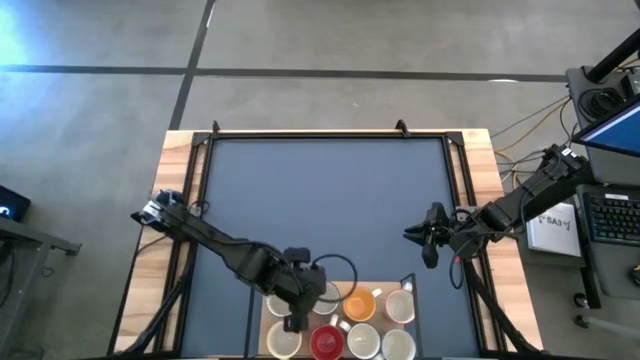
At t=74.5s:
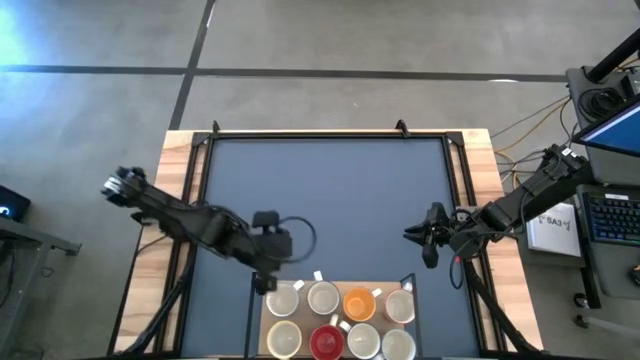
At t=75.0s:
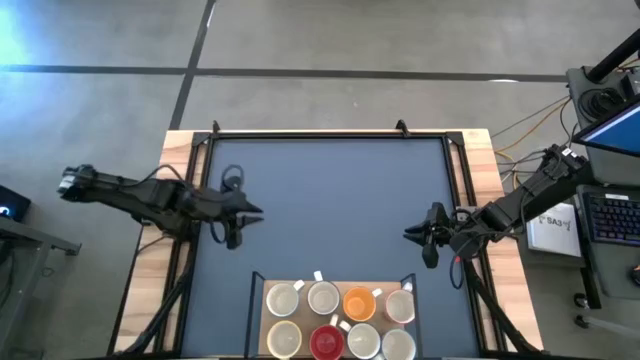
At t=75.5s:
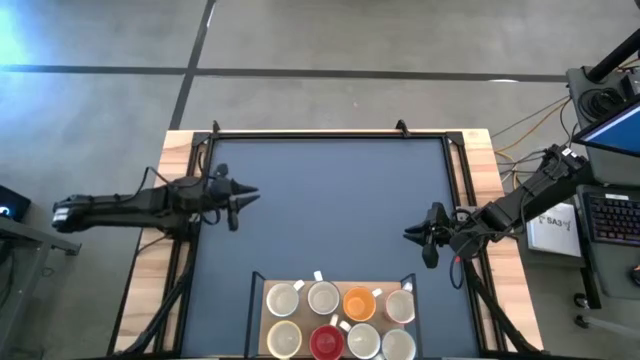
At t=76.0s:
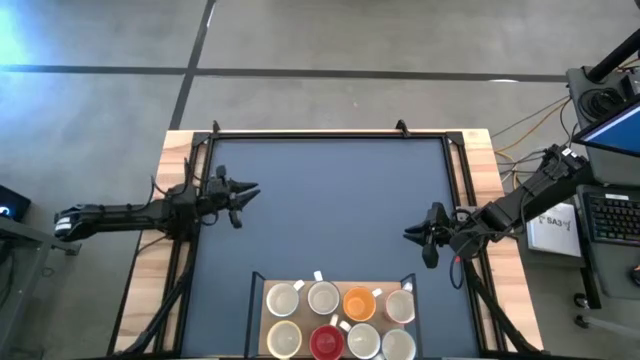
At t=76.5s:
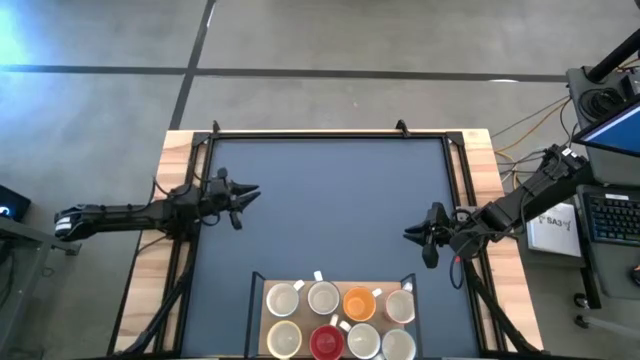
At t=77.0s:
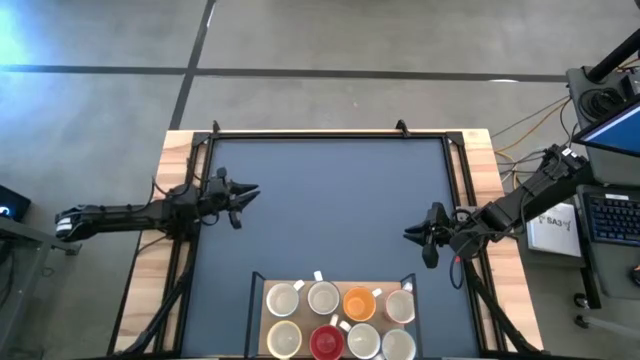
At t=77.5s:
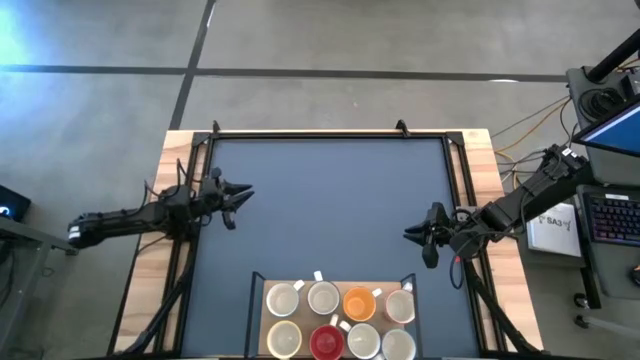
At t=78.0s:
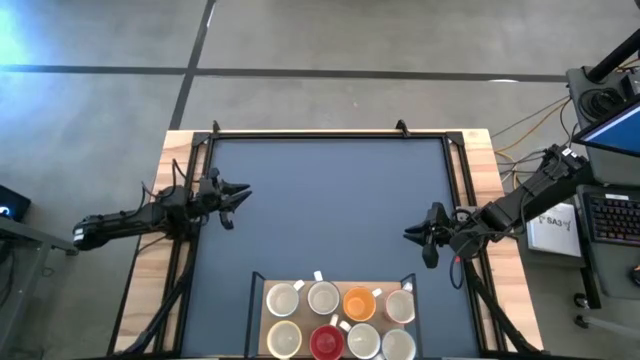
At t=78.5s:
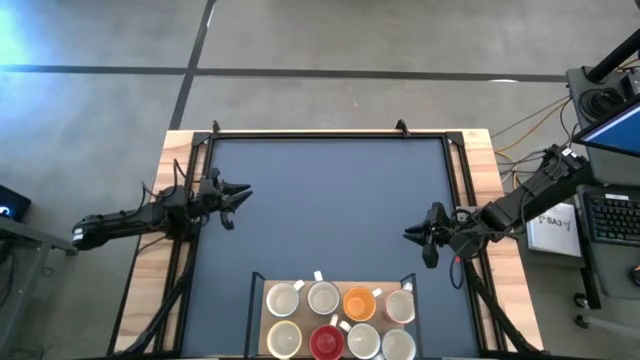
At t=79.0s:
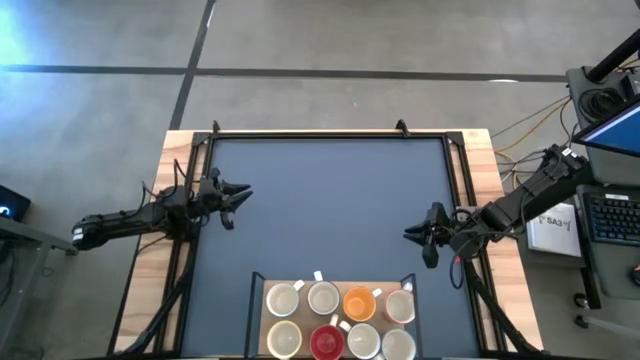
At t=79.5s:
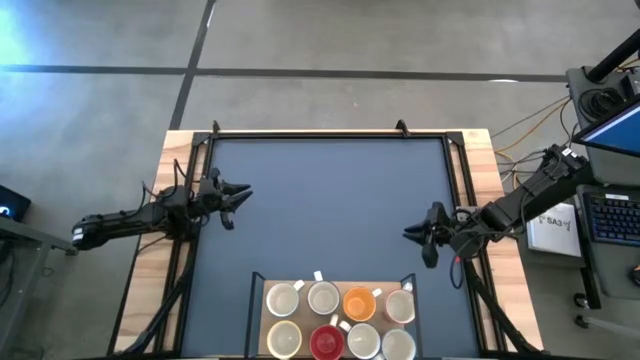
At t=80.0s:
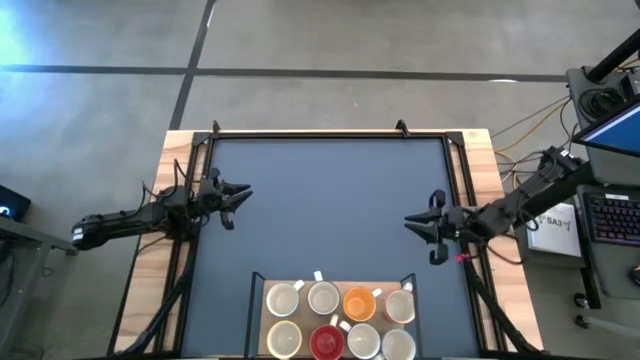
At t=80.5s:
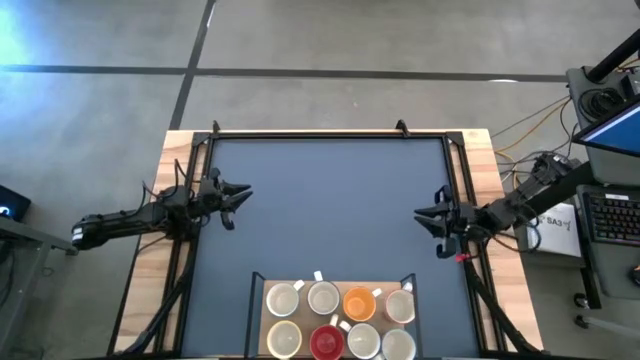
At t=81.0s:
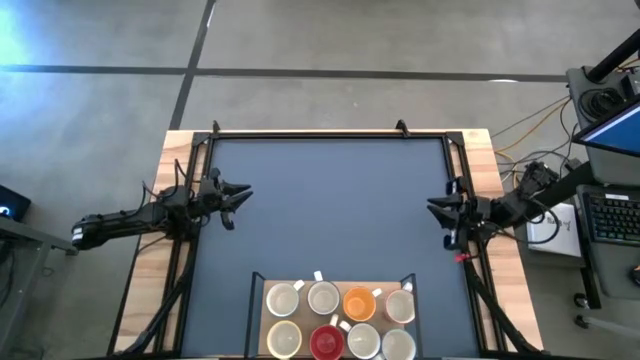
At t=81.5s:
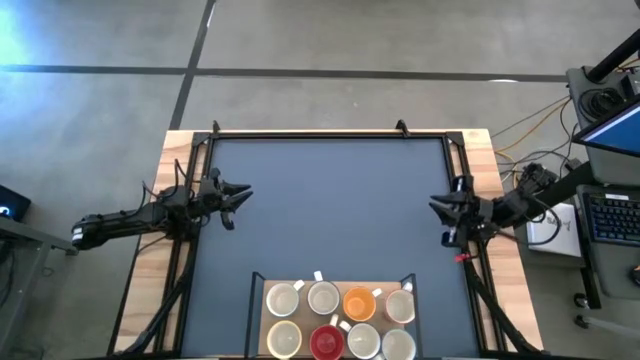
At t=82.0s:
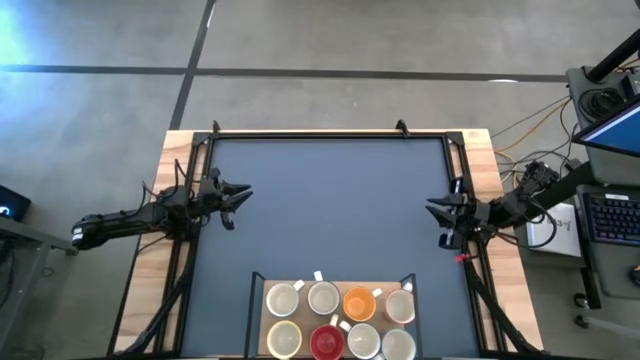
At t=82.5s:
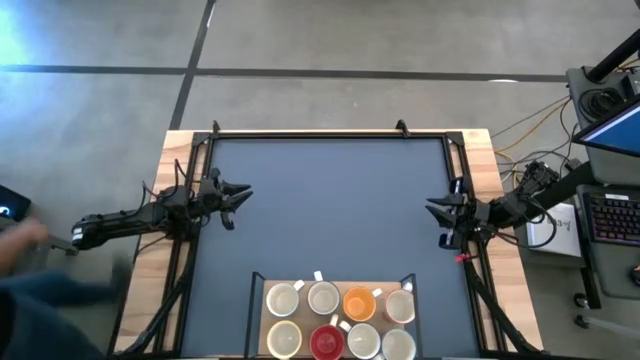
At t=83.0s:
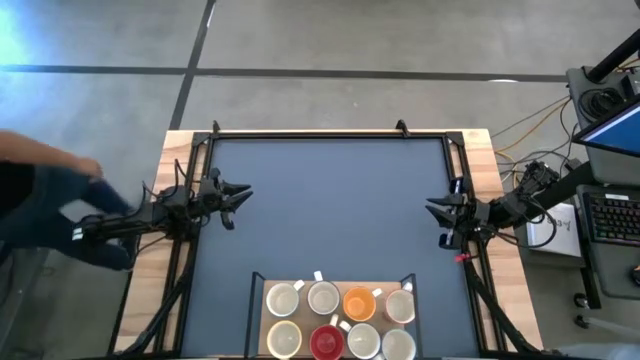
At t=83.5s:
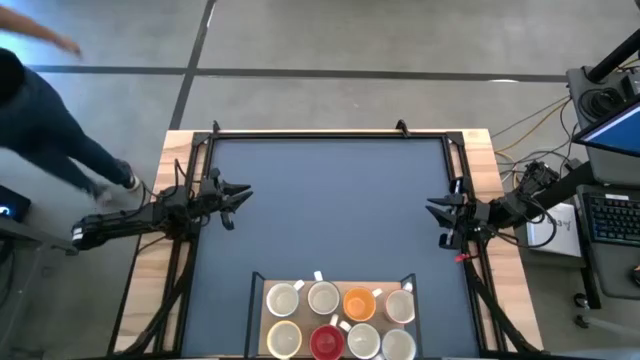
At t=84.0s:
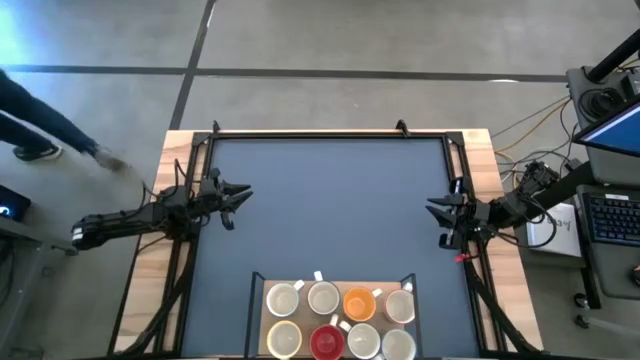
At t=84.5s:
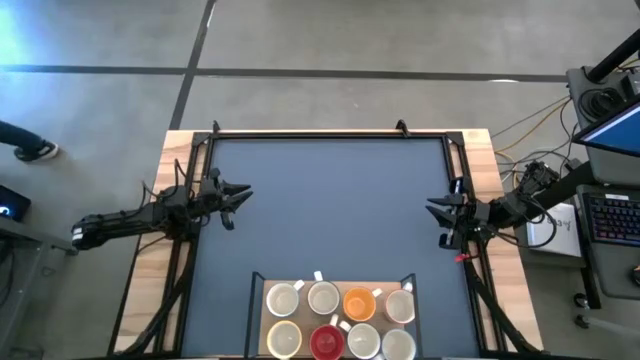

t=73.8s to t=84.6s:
Task: Place coffee mugs
Return to Home Position

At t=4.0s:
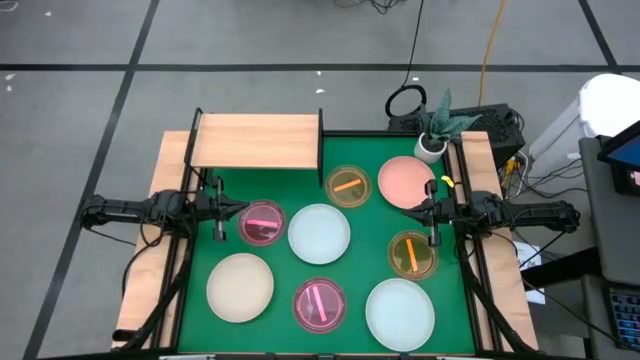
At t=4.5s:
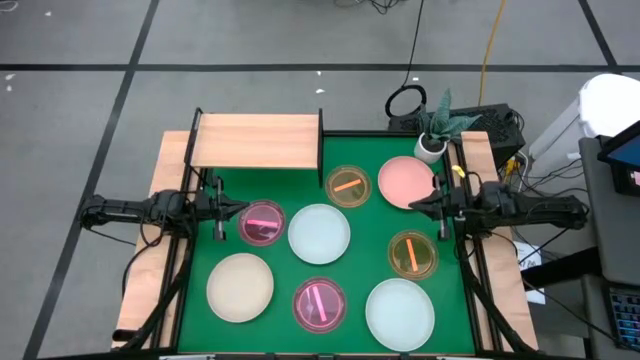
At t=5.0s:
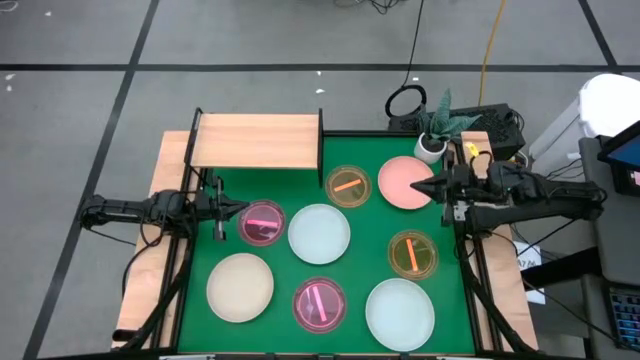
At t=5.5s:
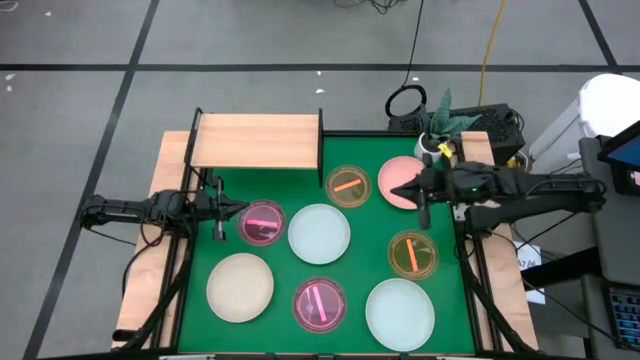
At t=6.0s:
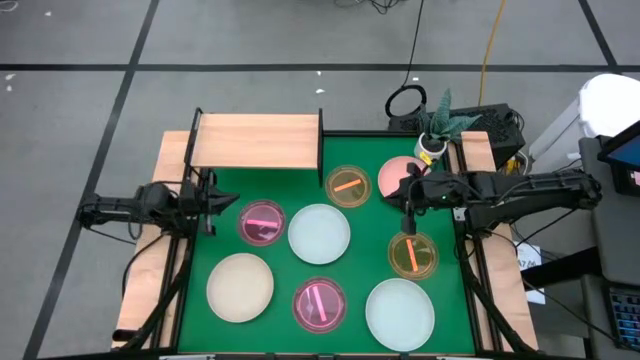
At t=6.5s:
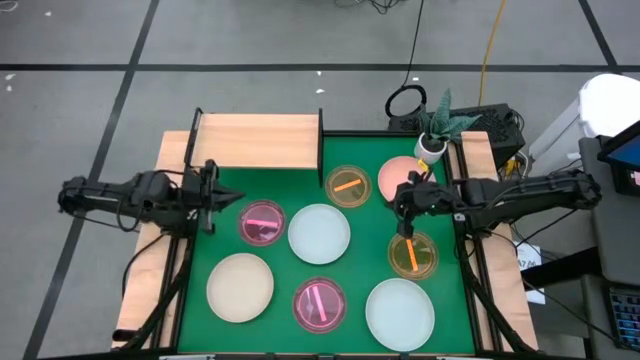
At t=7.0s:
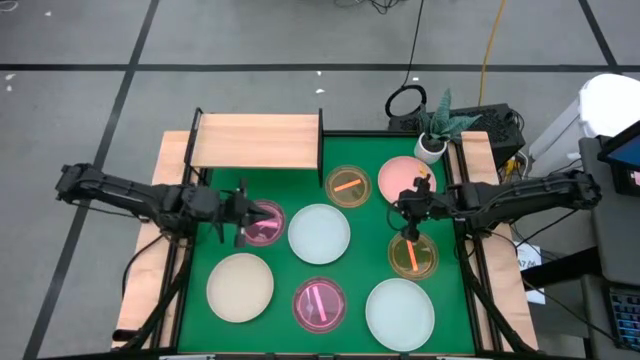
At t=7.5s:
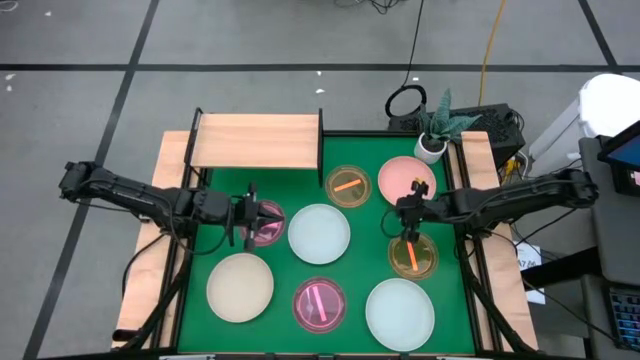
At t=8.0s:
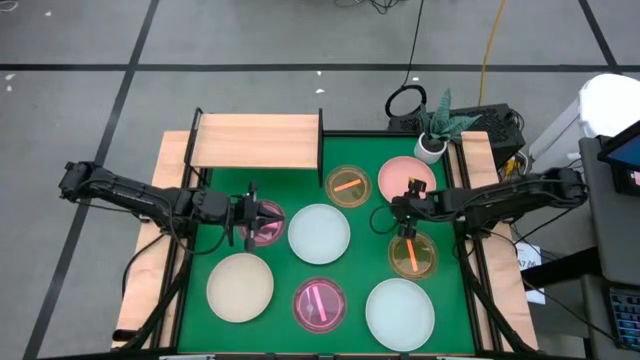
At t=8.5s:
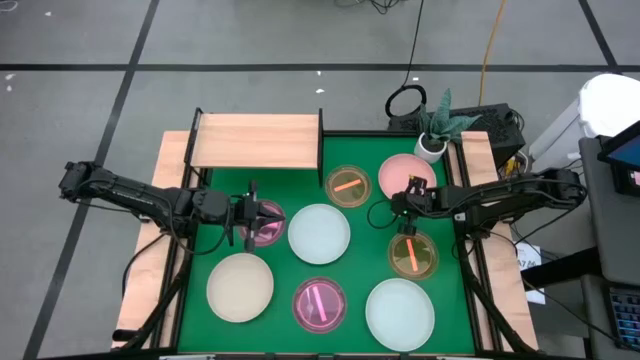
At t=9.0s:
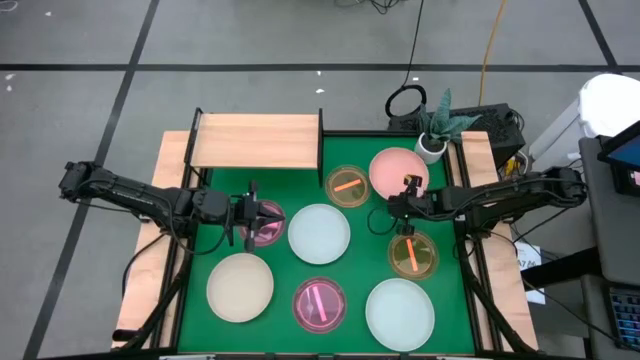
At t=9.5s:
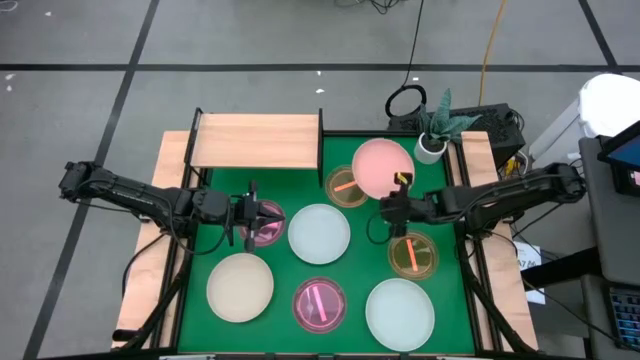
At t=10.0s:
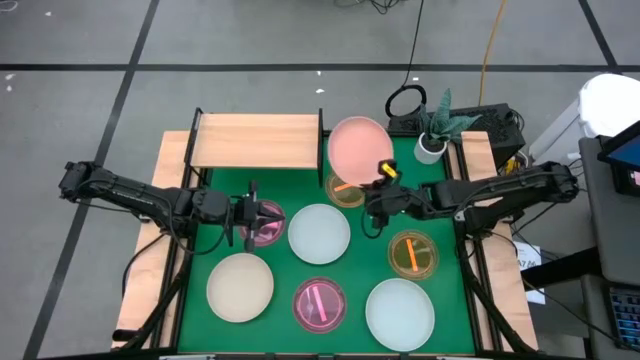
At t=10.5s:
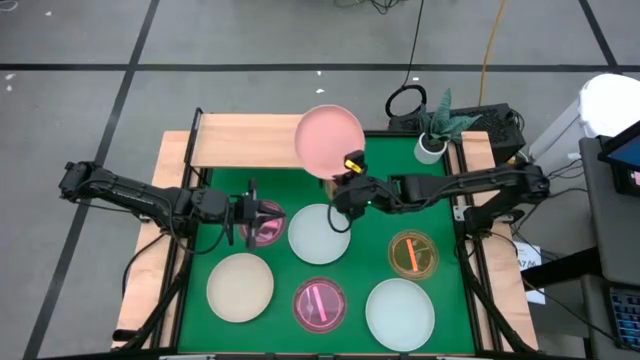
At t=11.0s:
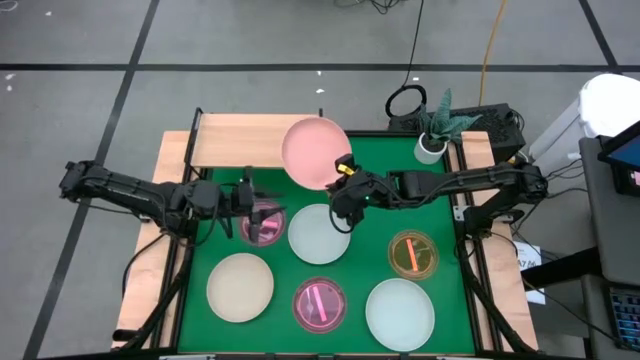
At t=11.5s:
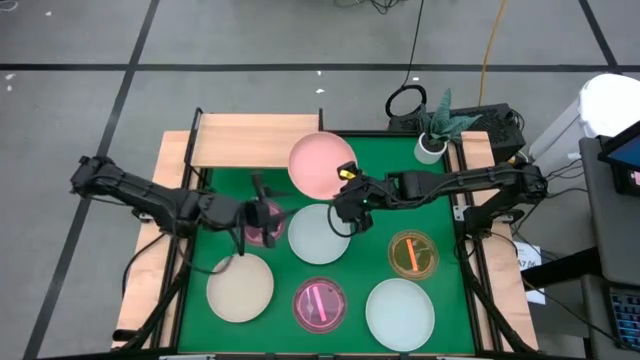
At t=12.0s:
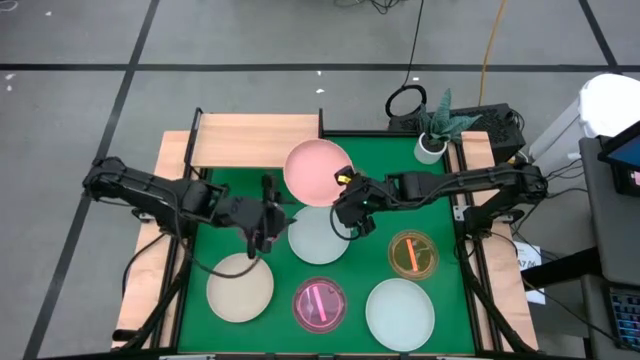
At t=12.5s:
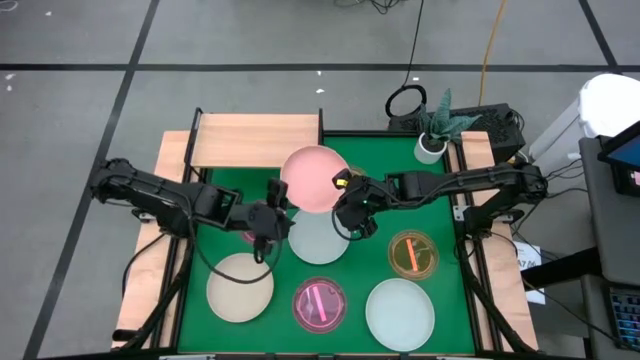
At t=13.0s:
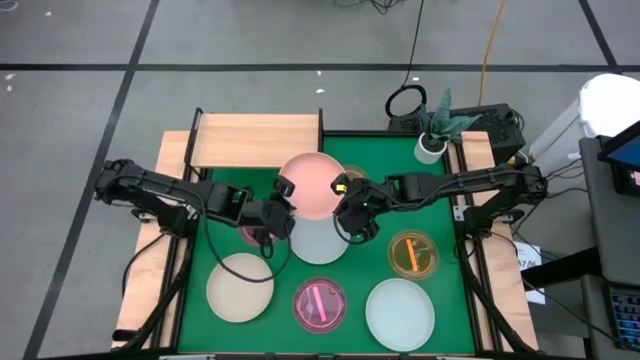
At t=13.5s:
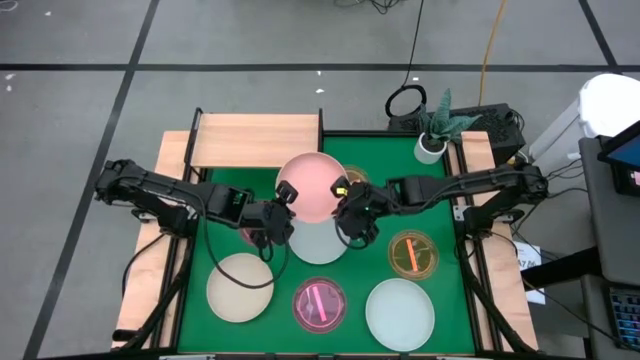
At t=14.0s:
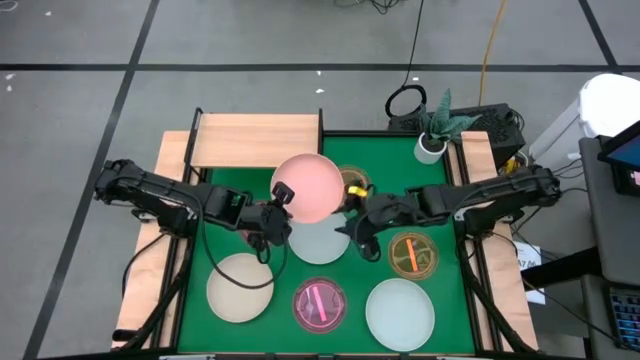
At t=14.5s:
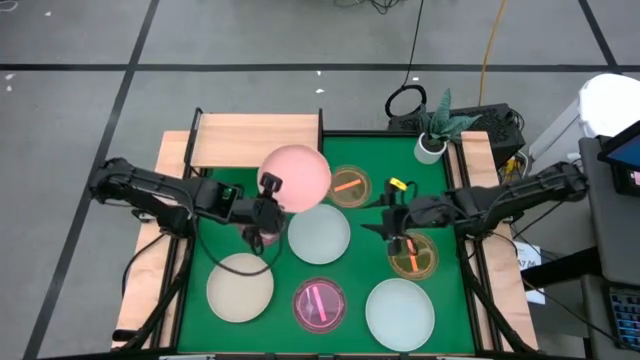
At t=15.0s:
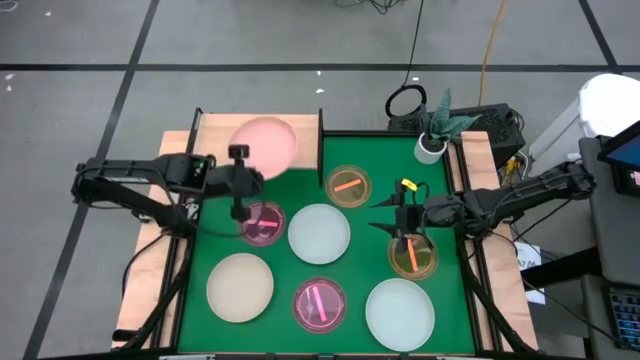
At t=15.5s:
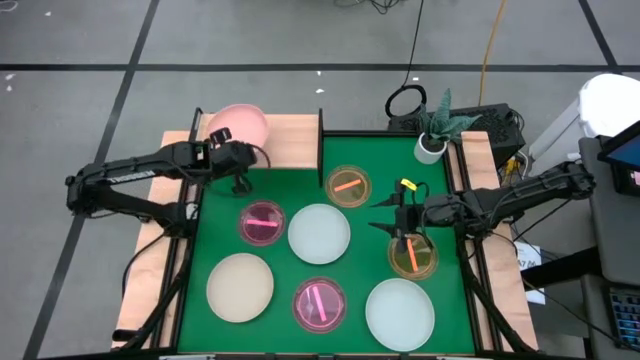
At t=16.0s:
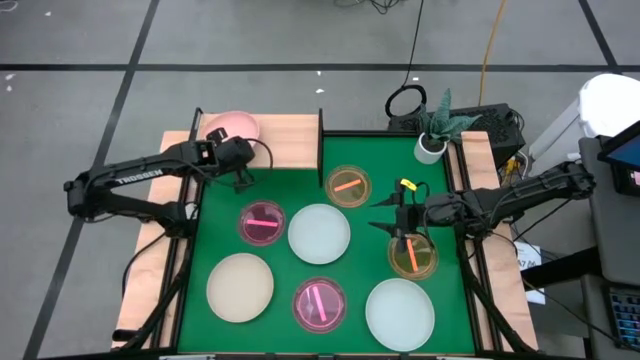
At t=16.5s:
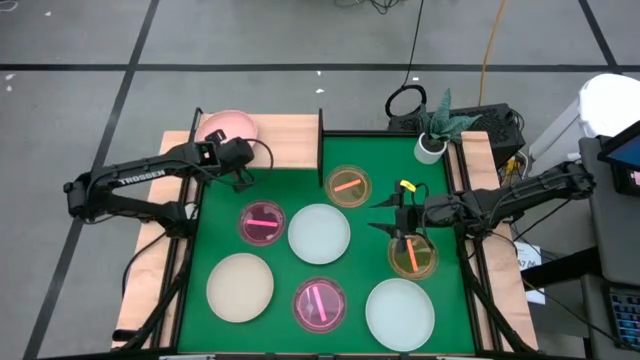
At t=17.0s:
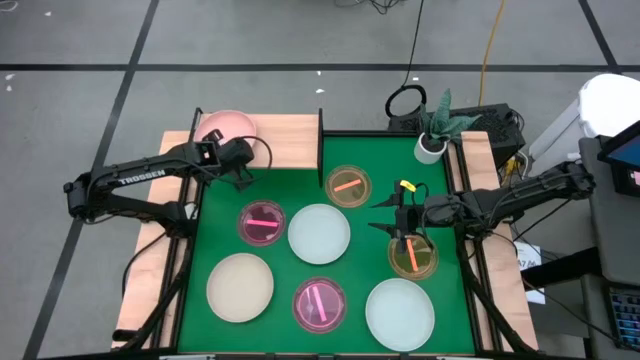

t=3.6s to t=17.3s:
Task: Place and stack plates onto a shelf
Put the light orange plate on the shelf
